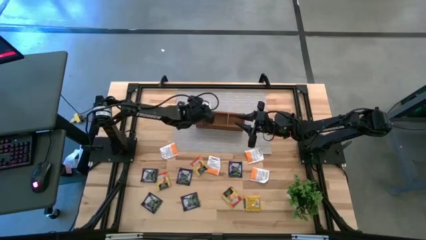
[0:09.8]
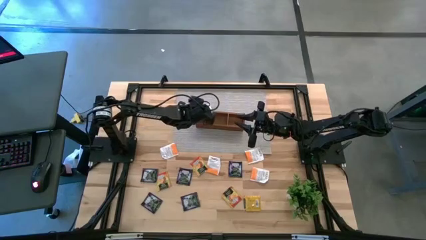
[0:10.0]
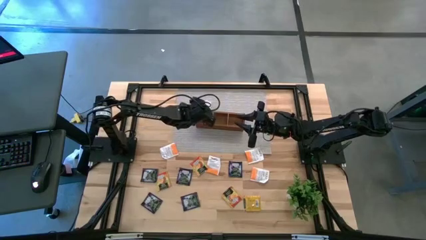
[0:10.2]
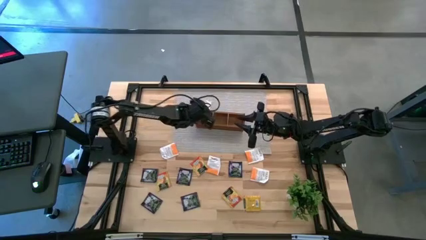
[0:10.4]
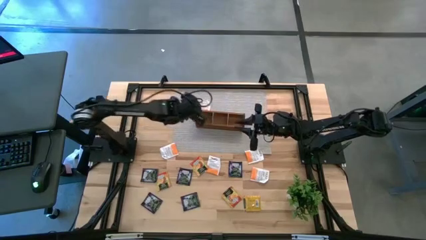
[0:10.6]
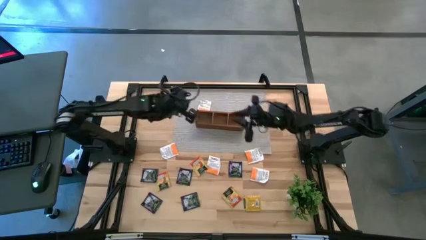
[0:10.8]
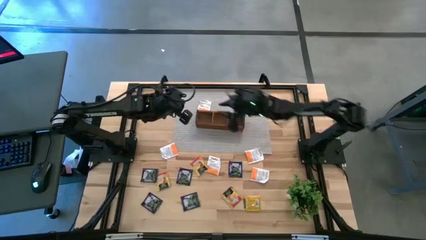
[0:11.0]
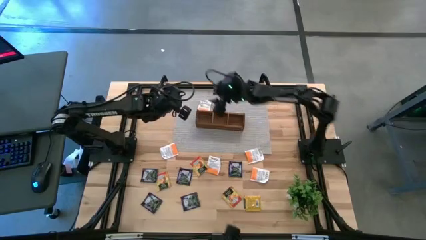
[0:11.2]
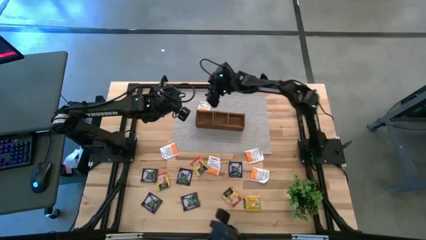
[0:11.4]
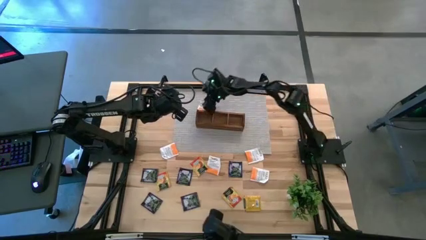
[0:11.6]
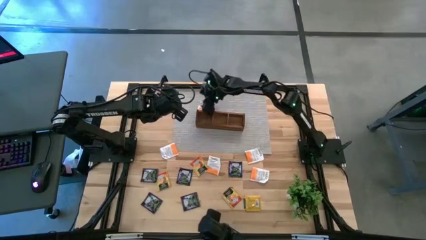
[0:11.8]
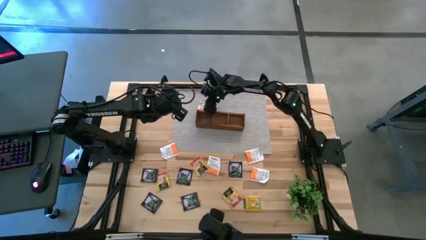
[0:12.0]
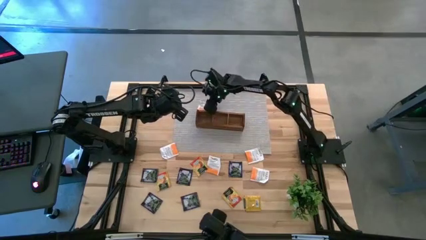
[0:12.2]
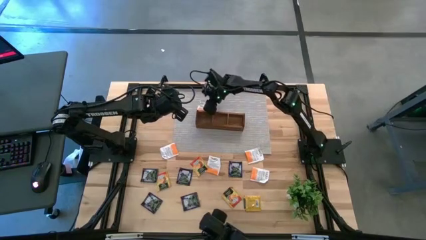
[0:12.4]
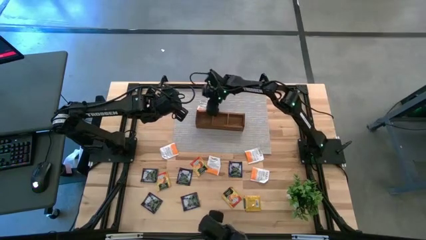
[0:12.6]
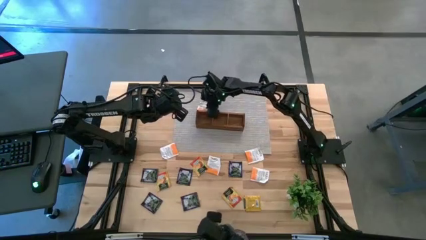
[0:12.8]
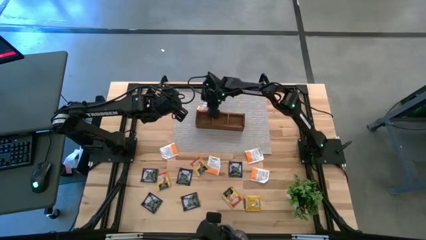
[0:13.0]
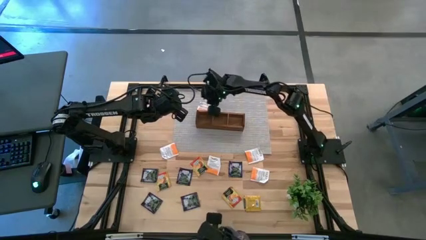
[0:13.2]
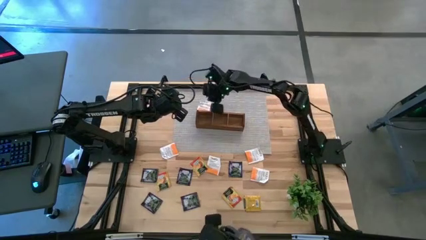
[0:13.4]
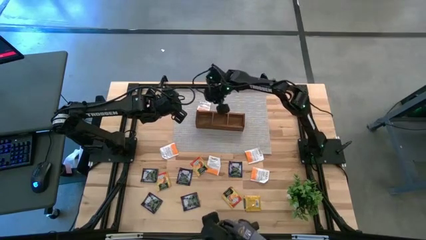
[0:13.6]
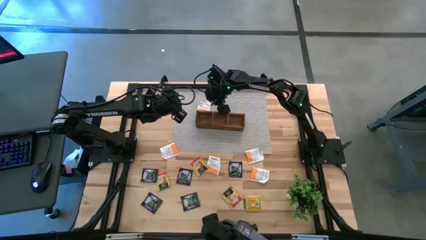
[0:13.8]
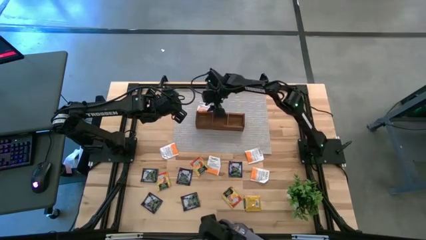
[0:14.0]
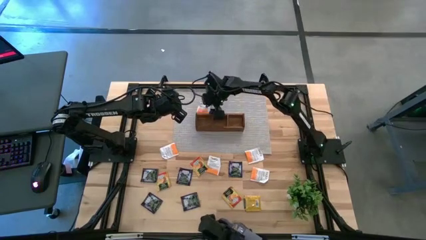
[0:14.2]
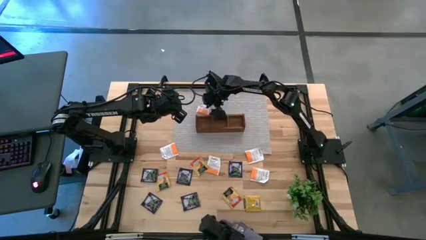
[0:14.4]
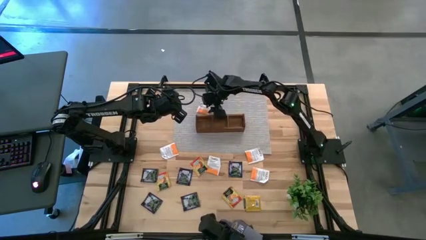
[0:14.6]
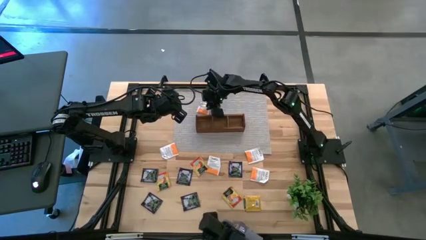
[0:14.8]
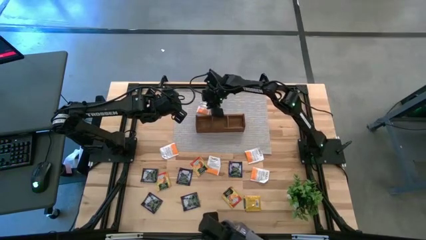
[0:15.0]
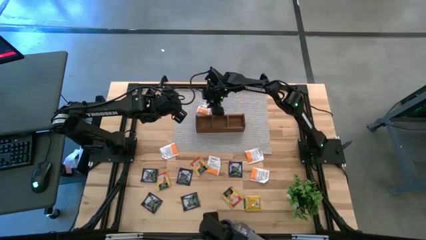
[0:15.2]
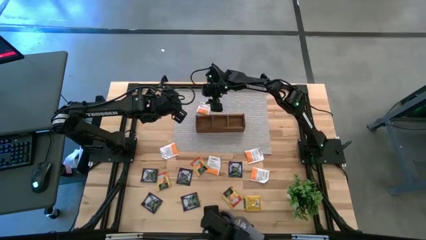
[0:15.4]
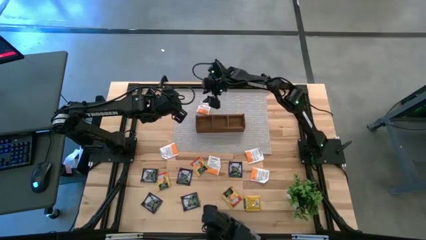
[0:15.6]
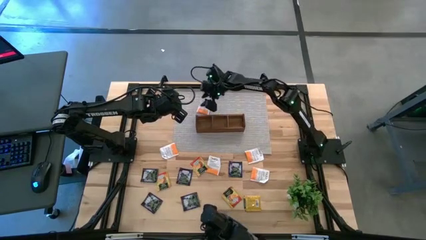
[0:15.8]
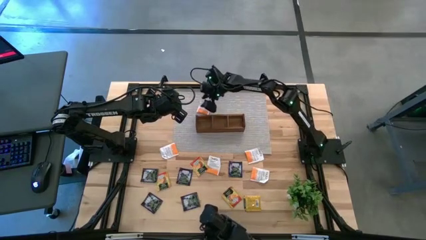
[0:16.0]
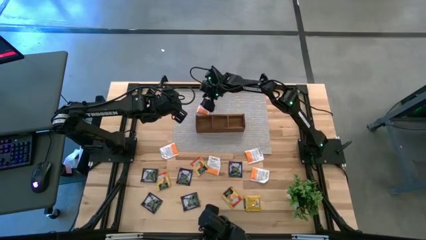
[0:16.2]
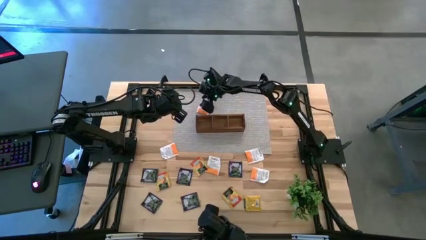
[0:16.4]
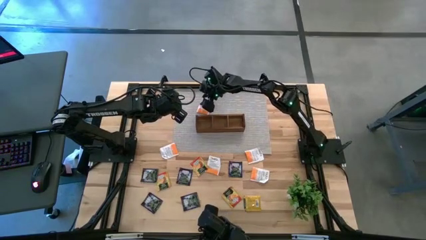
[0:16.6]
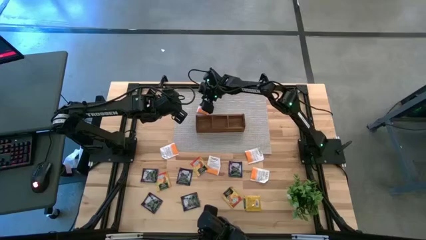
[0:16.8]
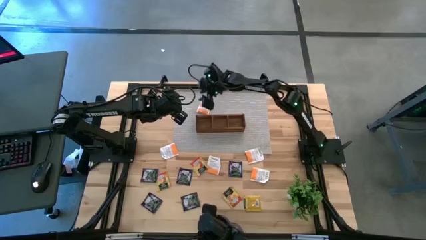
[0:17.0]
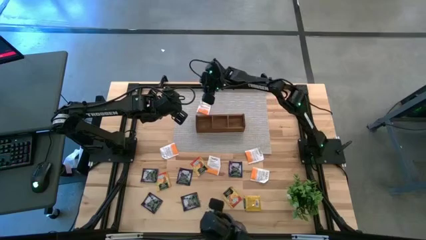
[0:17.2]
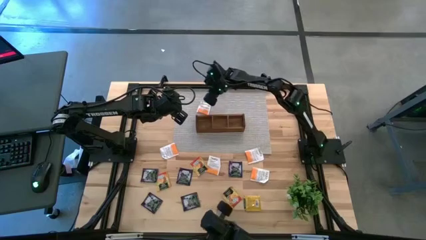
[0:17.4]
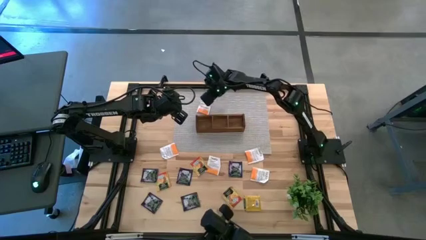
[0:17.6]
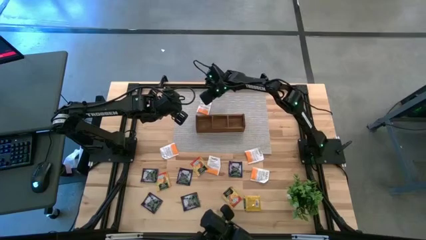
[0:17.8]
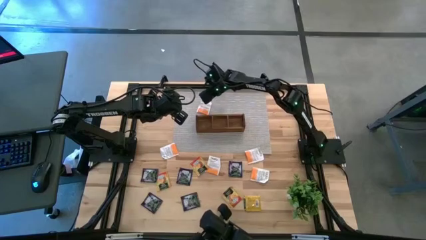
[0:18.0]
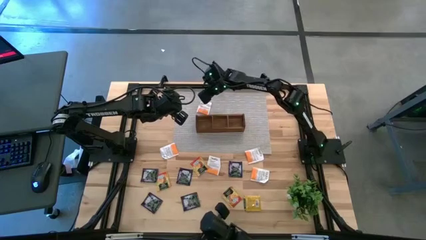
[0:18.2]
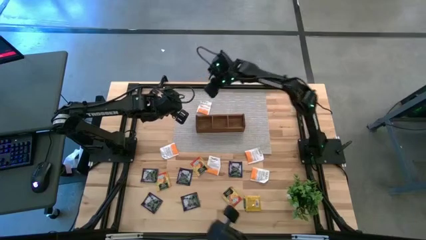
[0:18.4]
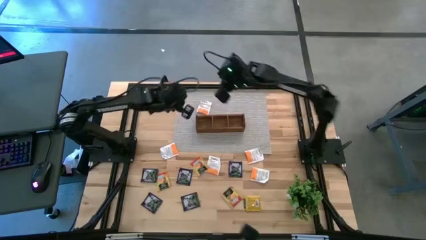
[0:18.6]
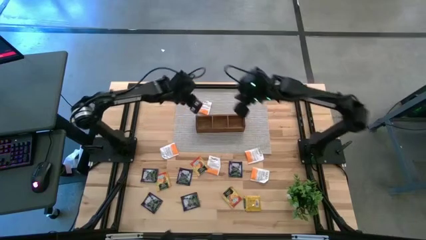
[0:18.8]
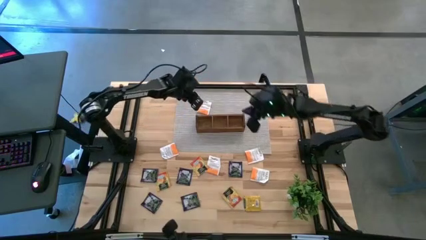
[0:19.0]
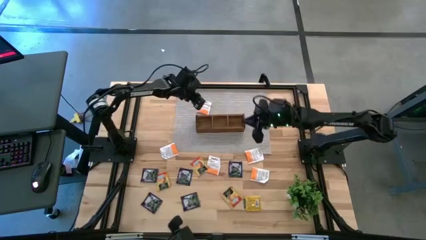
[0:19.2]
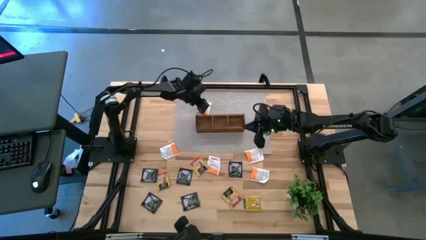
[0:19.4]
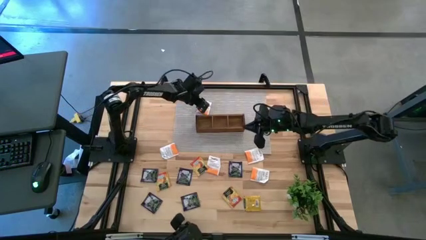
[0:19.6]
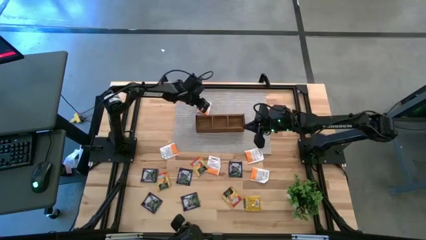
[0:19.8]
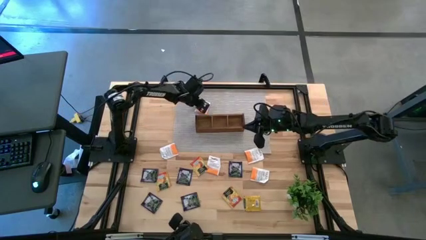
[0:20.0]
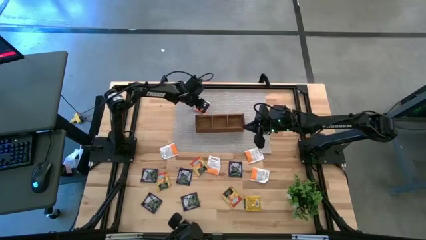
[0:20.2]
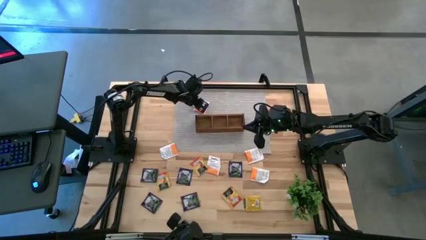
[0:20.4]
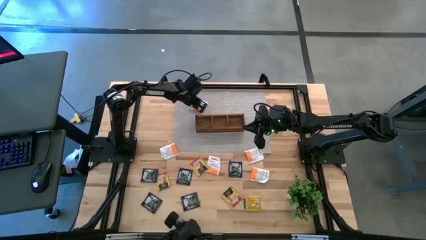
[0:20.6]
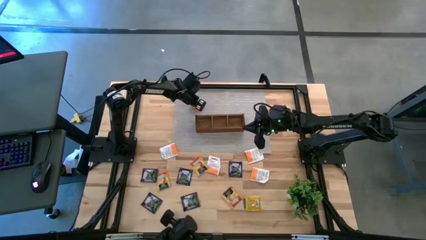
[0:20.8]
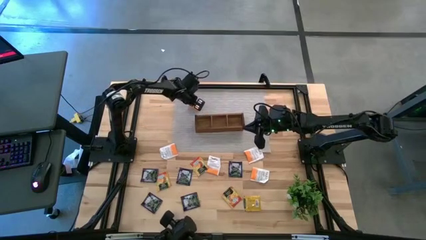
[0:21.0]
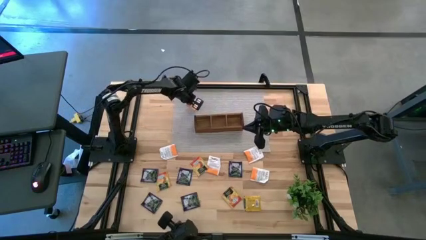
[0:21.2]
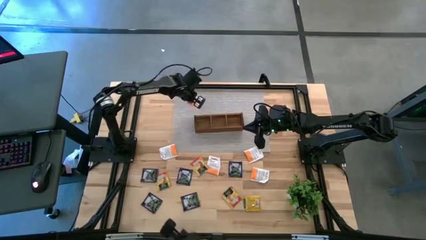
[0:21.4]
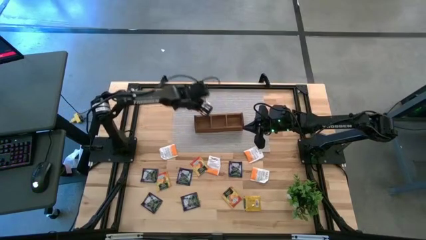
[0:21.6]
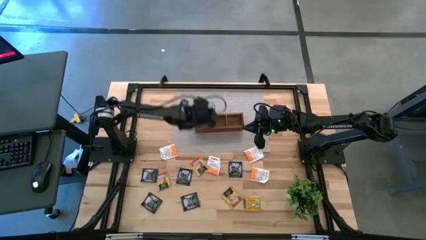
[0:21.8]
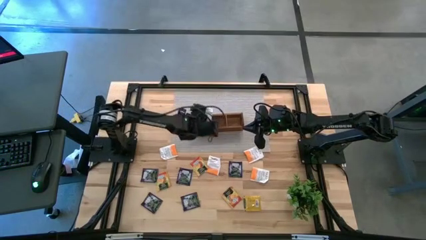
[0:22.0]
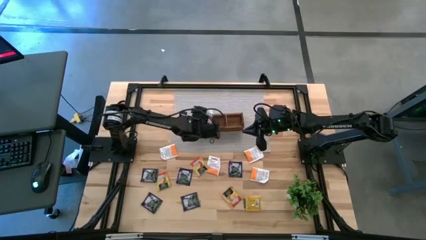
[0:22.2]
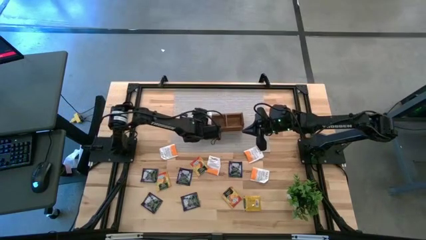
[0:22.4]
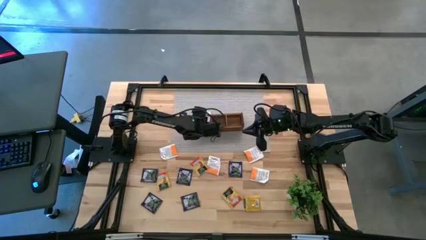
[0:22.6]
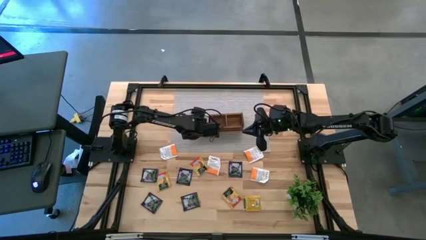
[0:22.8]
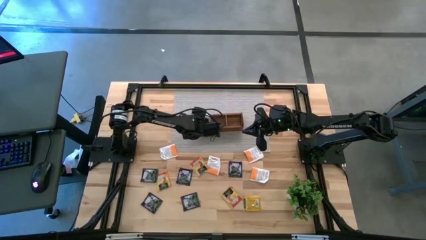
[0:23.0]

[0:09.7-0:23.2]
Task: Pick & Place Tea
Put the orange tea bag into the left section of the wooden organizer
